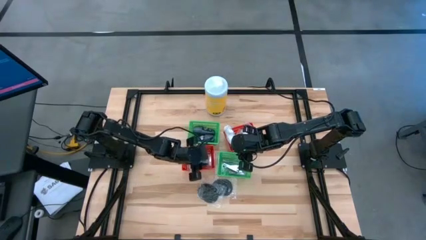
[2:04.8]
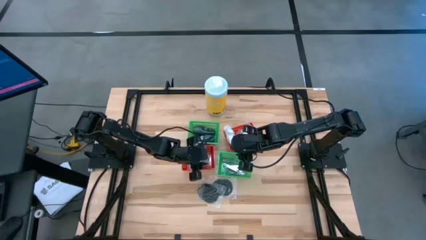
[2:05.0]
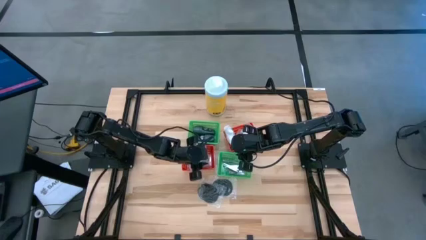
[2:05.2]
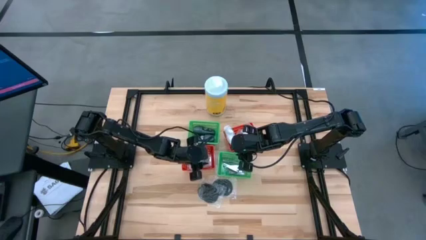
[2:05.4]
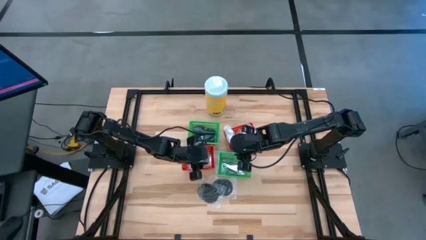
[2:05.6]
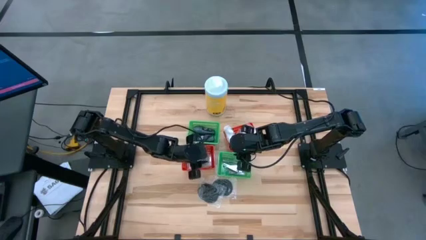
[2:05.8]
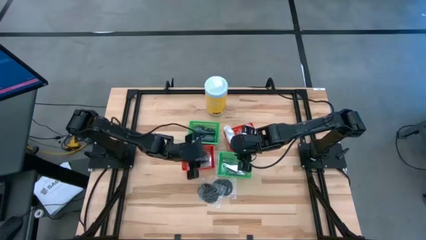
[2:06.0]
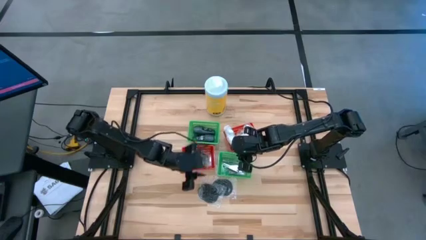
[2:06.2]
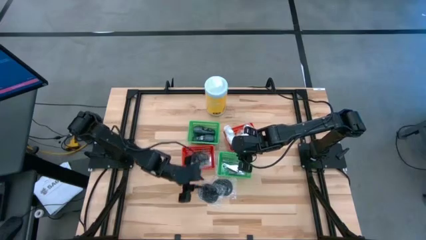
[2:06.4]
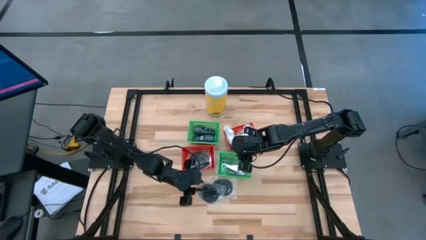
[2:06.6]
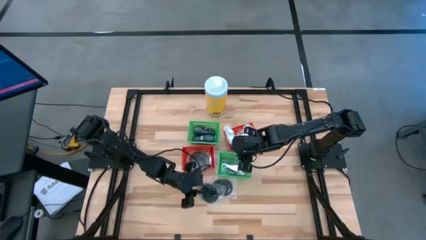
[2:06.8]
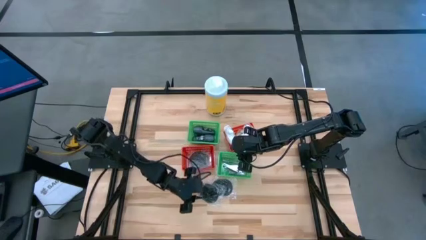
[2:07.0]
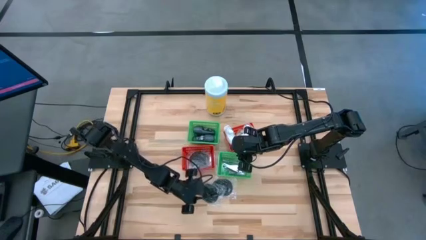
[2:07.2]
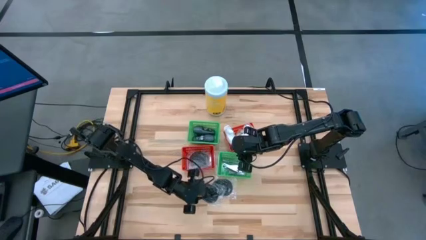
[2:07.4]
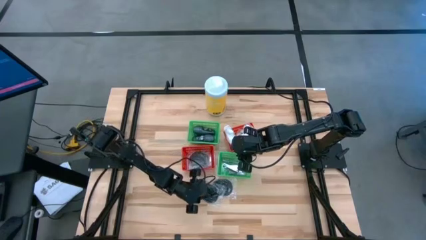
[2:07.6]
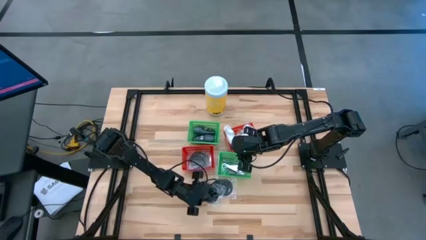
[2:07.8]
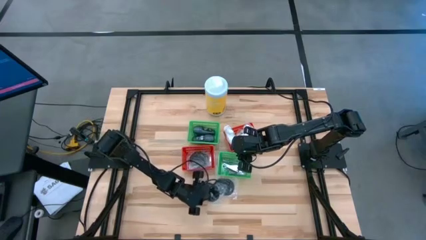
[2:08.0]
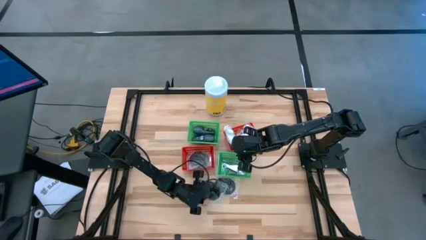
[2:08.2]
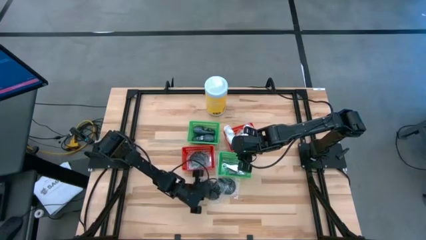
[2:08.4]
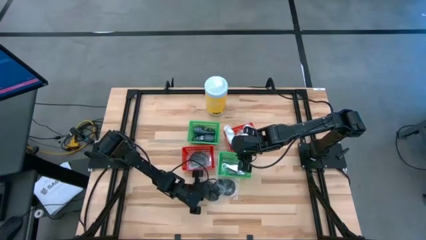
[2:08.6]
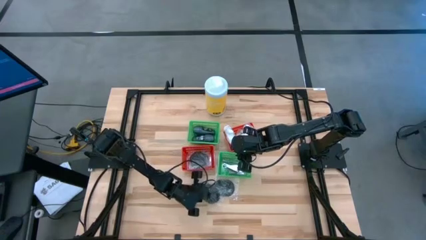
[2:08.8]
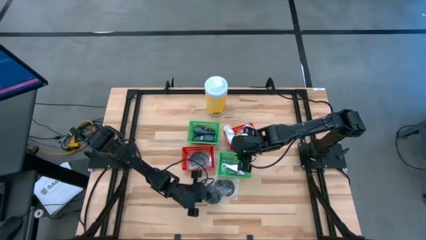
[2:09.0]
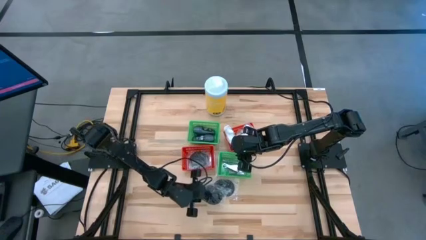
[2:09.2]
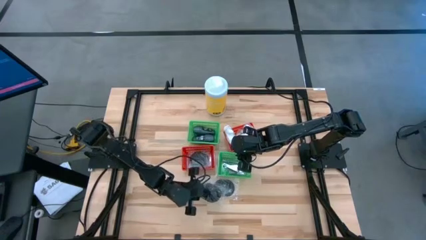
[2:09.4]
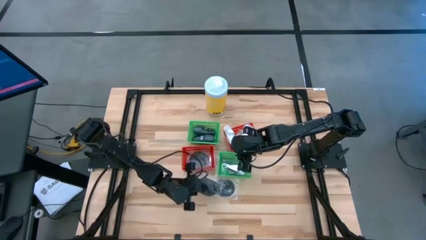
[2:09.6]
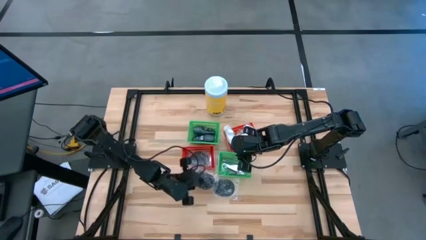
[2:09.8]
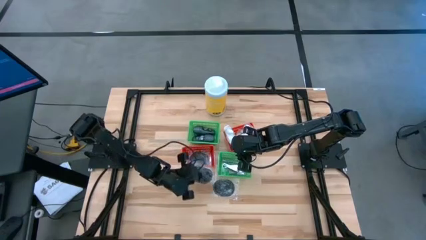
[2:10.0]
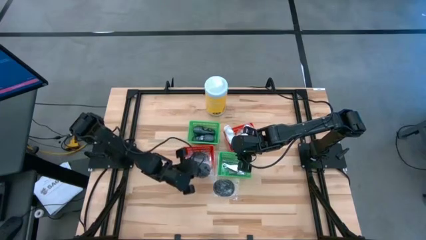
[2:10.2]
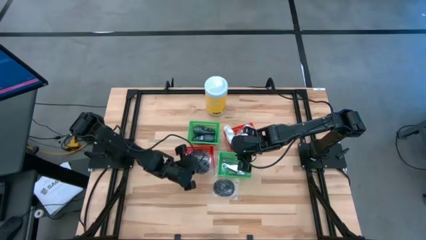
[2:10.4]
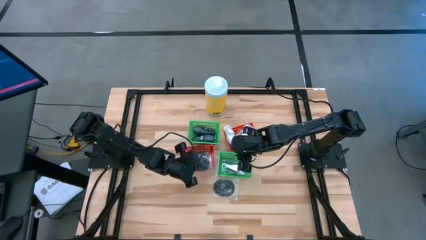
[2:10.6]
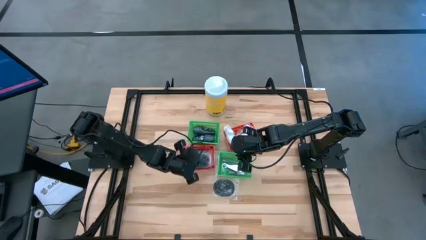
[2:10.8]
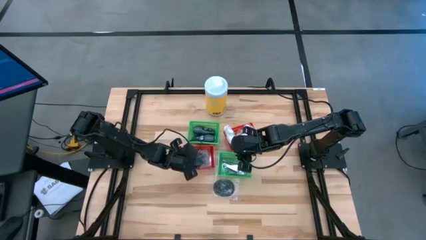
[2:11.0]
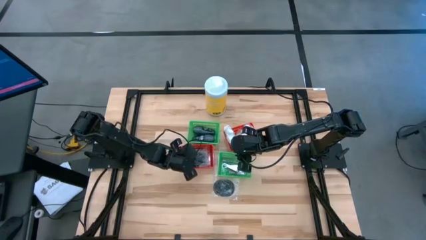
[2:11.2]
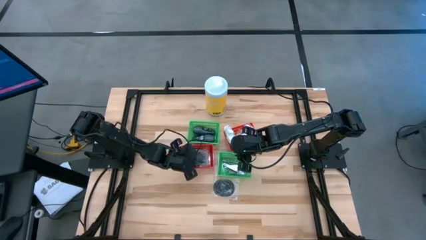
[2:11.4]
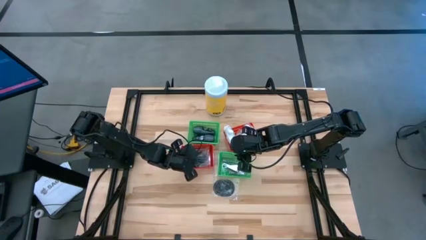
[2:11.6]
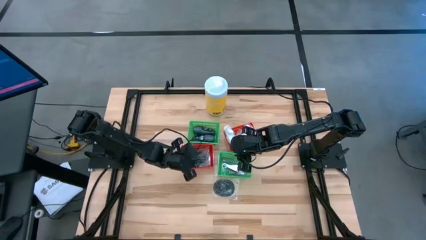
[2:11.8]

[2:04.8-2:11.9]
Task: Pick & Place Travel size toiletries
Put the hairbrush into the left red bin

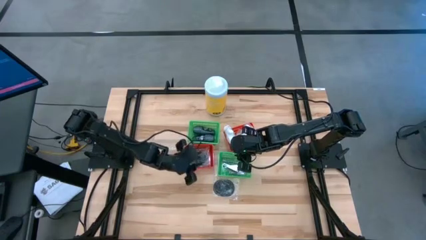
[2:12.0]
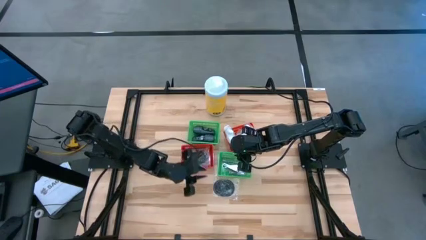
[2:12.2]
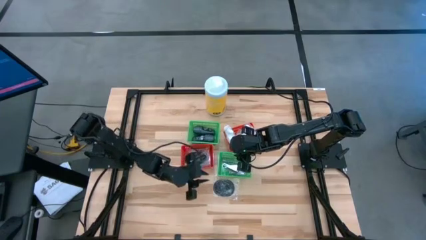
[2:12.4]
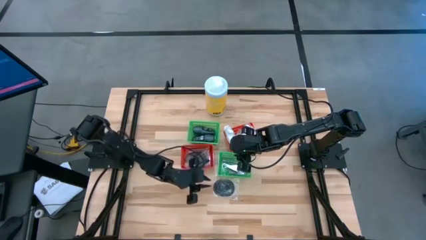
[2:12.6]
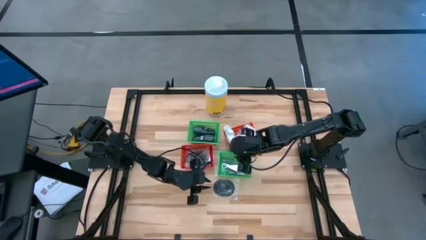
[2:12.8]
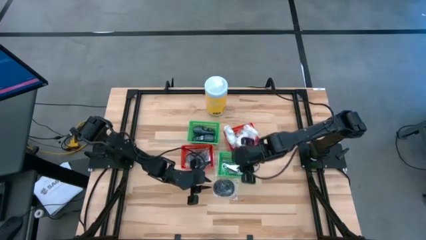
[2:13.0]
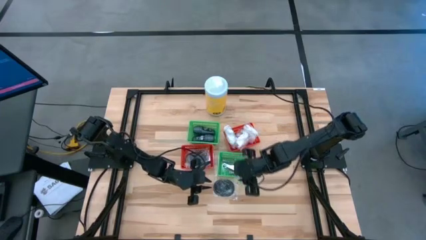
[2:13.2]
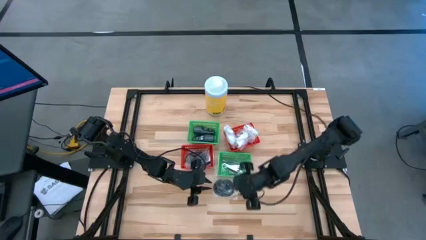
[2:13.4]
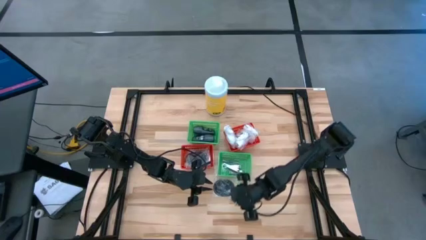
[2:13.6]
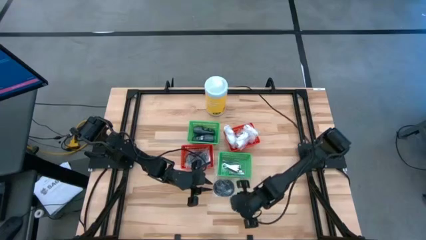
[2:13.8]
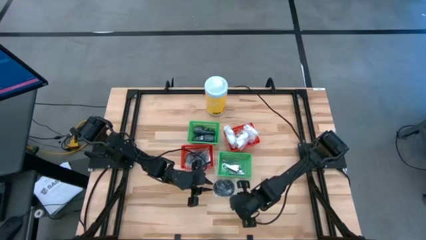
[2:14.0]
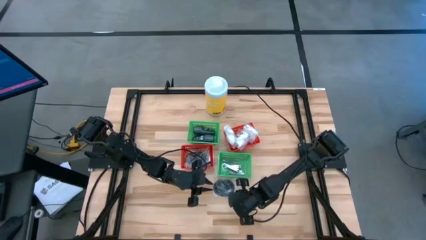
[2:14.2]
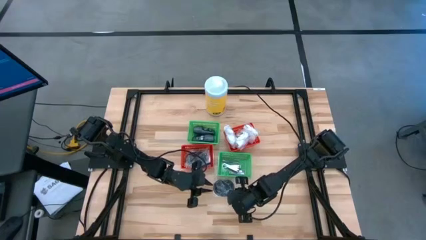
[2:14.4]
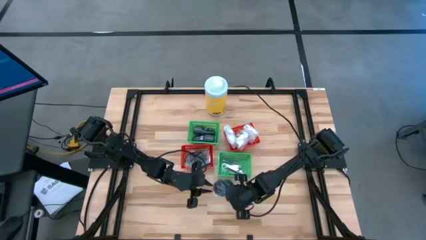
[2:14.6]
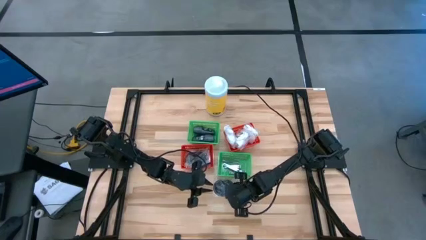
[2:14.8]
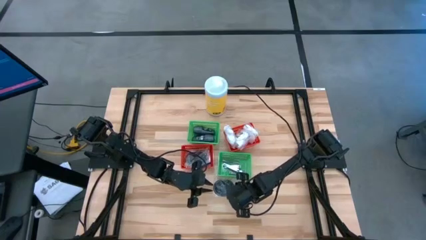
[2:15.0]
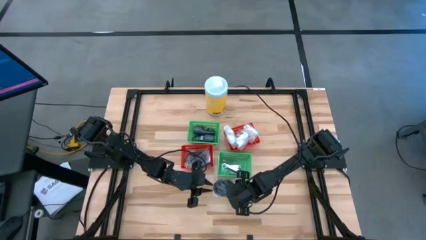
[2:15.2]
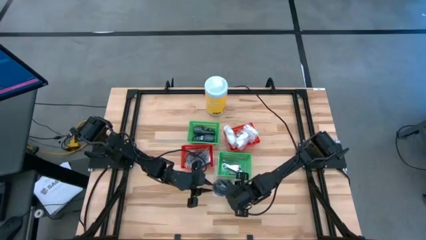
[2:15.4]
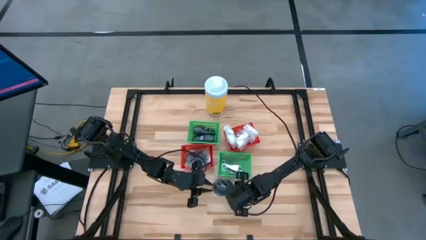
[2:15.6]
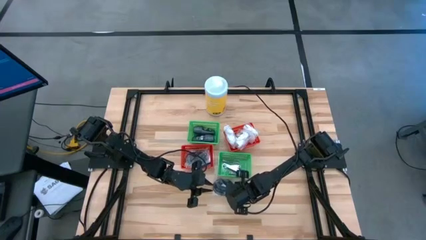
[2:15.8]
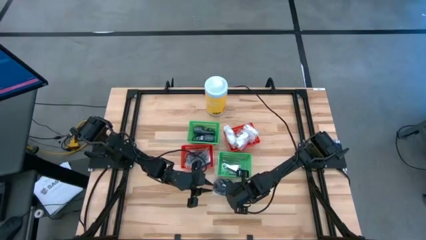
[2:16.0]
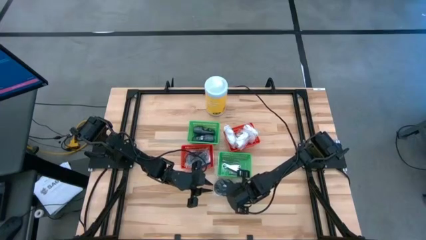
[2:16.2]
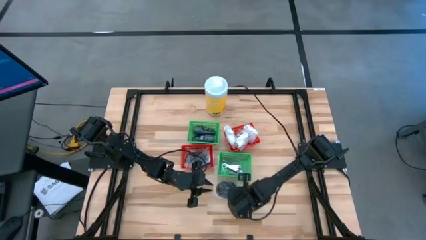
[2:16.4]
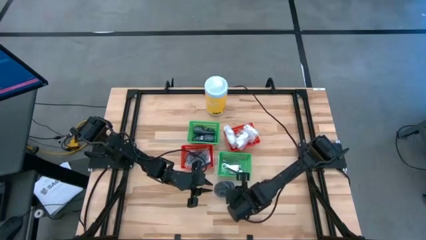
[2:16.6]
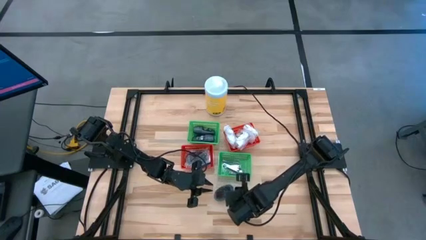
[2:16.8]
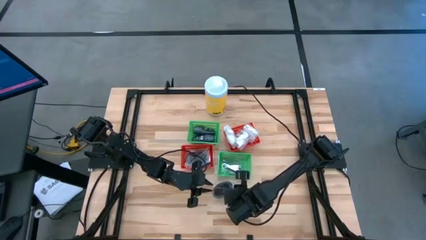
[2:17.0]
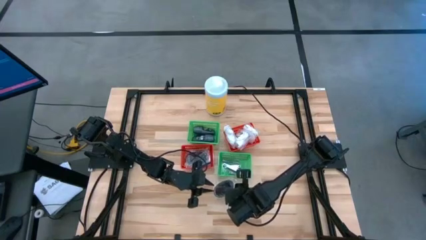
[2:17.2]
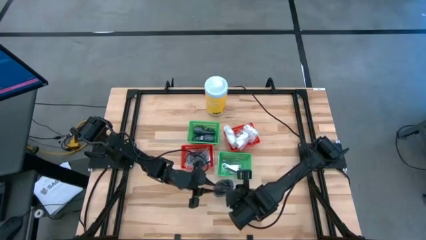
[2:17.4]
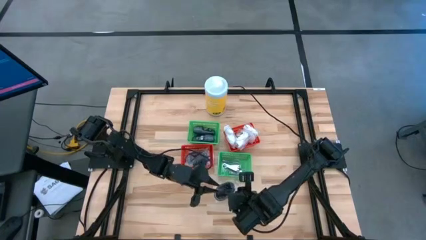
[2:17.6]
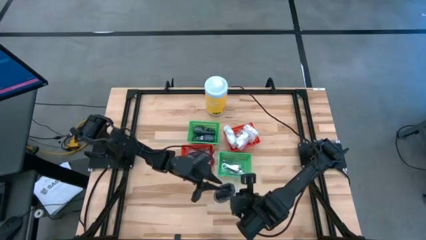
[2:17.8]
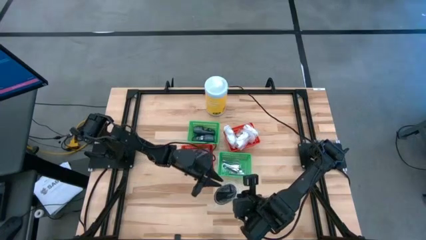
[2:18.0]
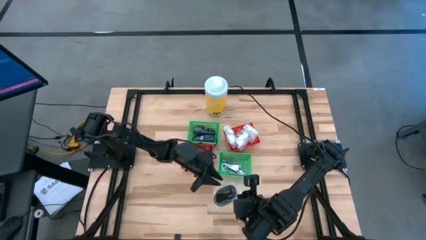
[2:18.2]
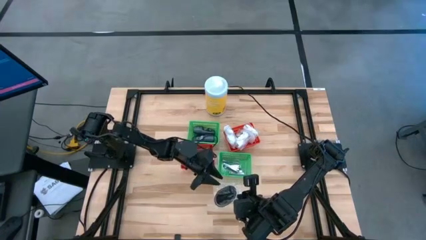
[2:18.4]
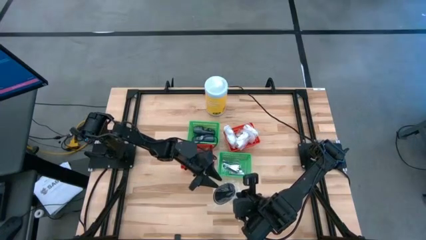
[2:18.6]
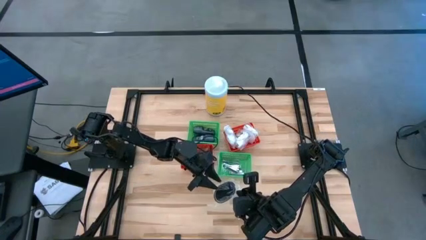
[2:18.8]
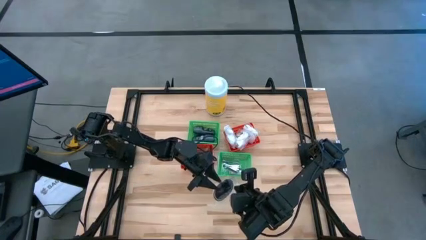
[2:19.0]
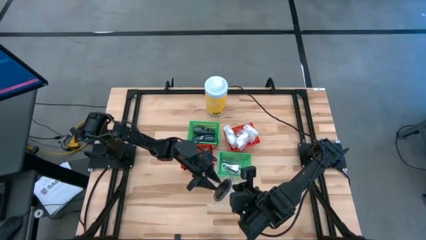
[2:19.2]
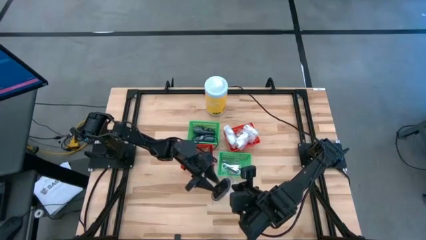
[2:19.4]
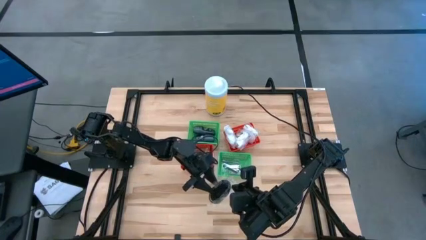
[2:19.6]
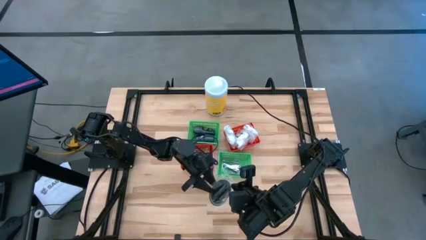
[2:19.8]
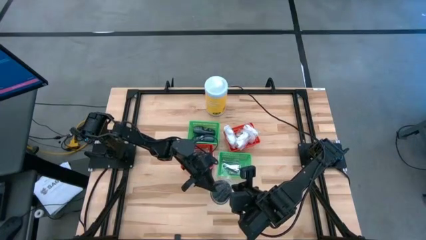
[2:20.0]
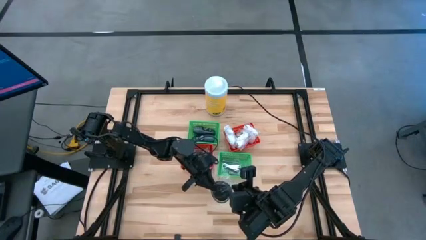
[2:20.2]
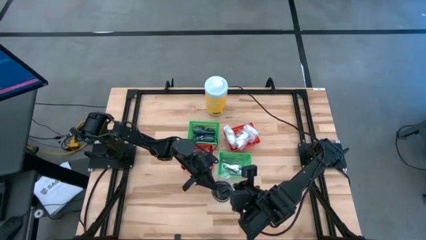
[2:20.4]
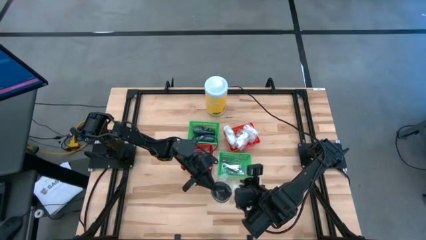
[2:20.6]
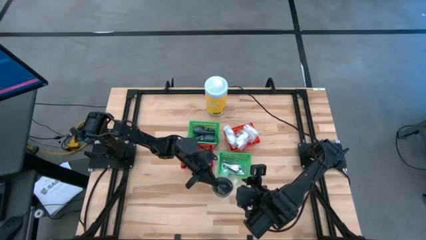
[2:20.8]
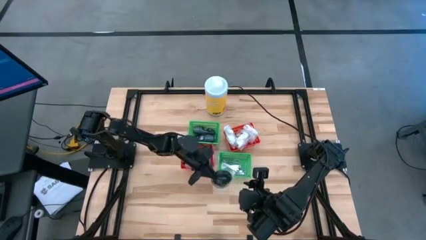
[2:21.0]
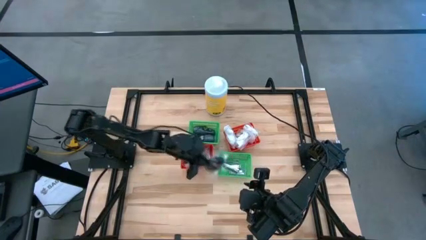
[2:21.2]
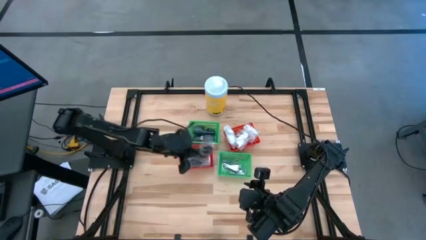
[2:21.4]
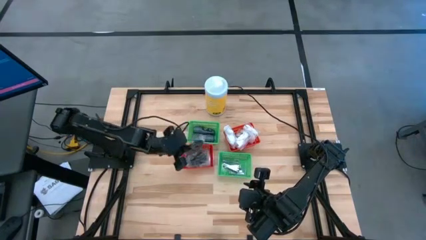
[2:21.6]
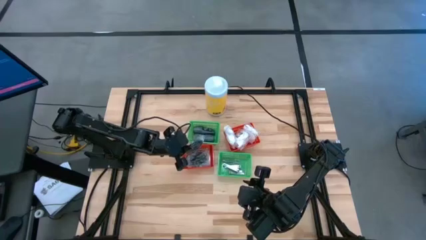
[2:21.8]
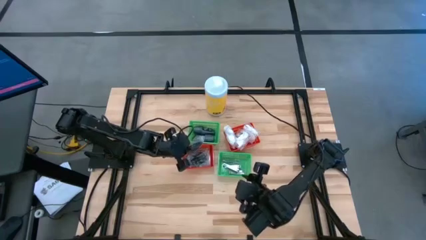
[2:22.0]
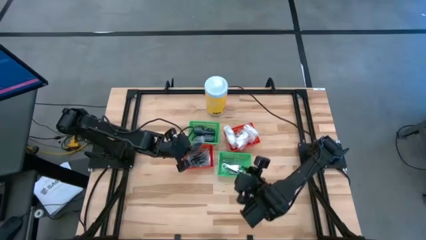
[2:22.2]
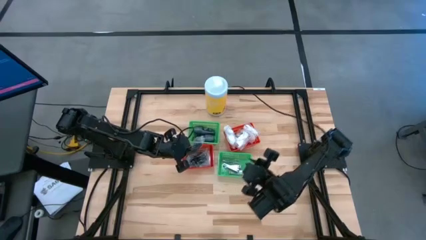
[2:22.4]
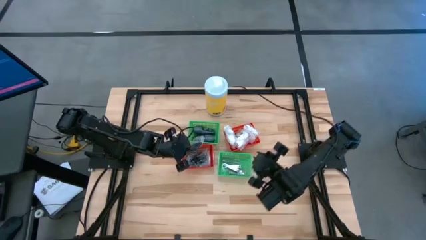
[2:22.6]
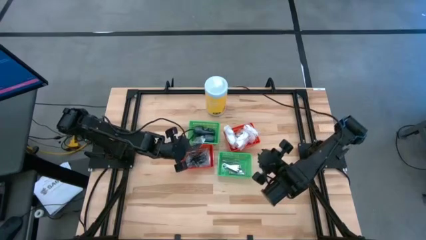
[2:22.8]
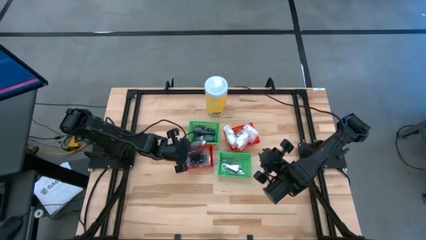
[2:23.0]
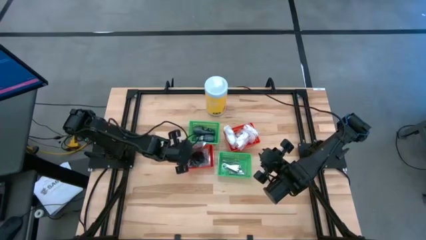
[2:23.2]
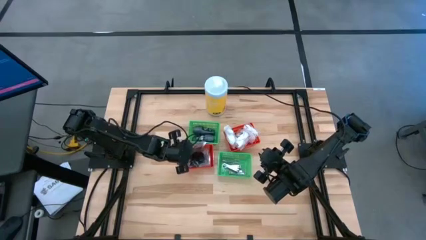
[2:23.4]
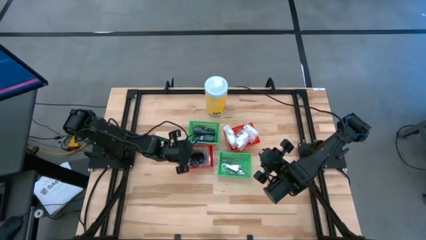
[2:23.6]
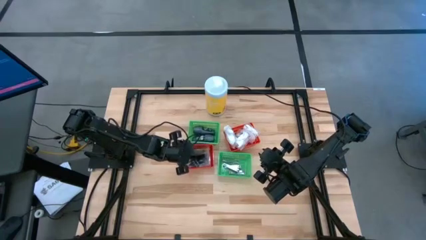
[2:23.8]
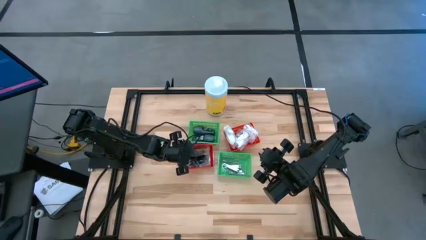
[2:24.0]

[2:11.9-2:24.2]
Put the hairbrush into the left red bin
